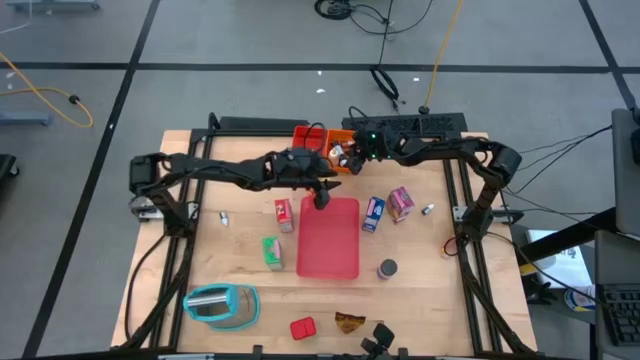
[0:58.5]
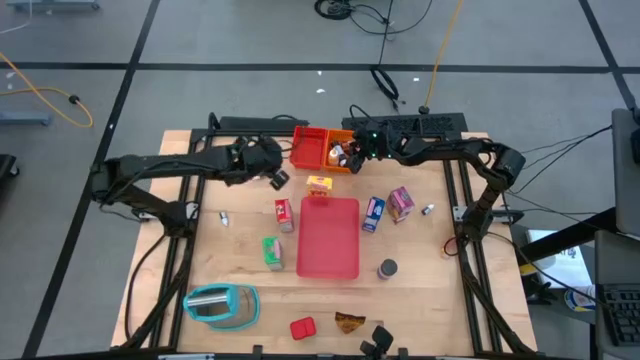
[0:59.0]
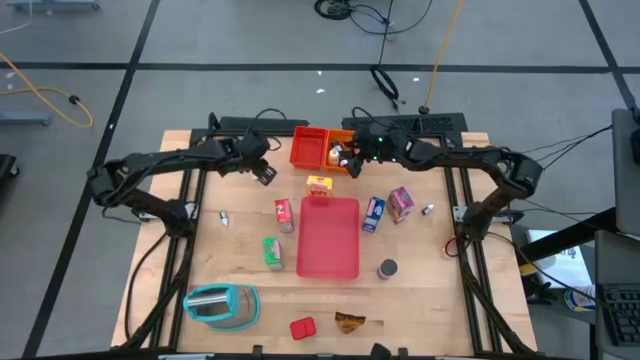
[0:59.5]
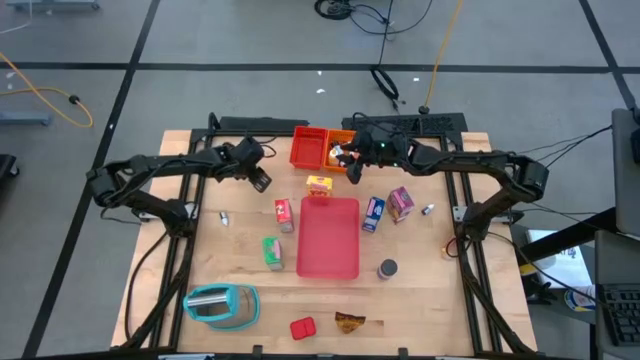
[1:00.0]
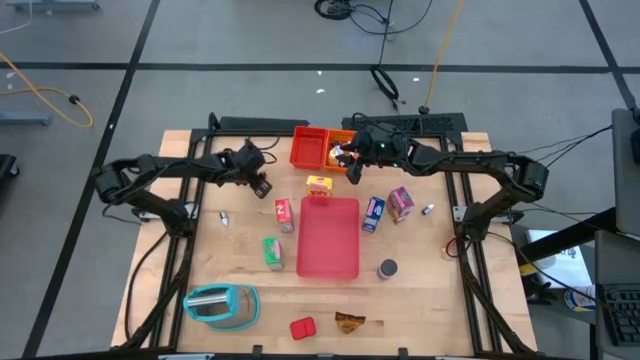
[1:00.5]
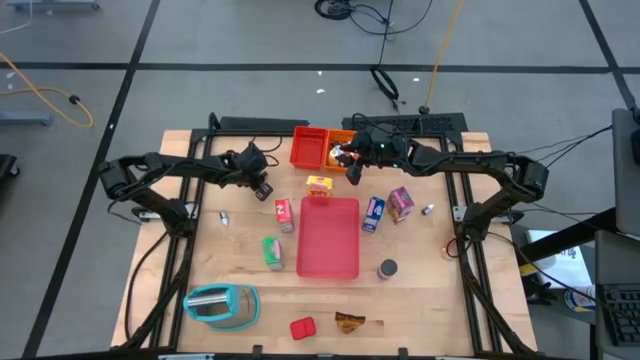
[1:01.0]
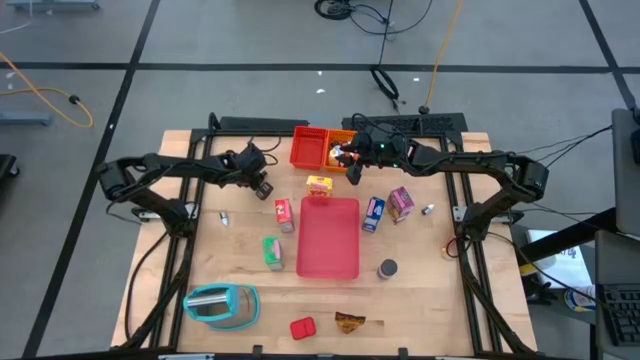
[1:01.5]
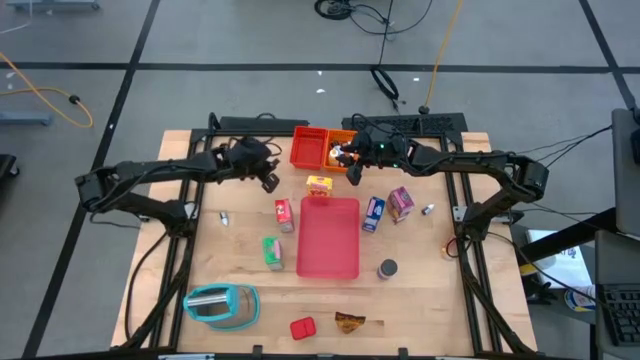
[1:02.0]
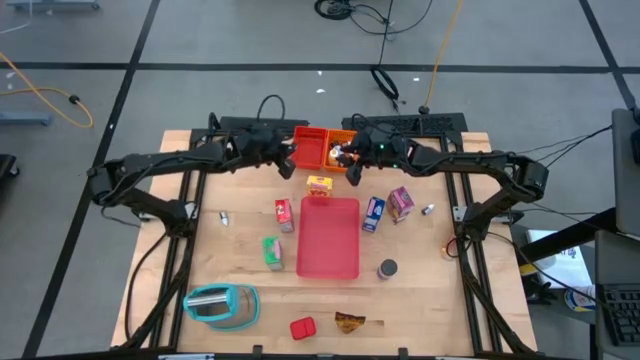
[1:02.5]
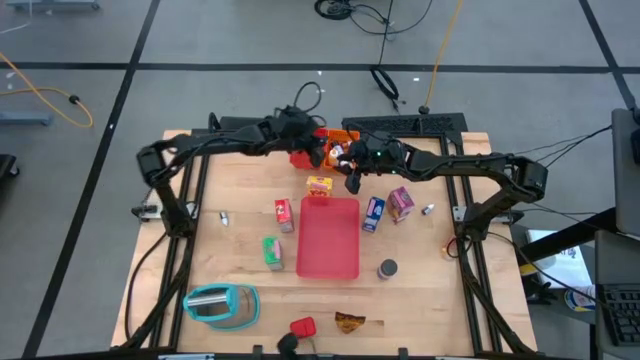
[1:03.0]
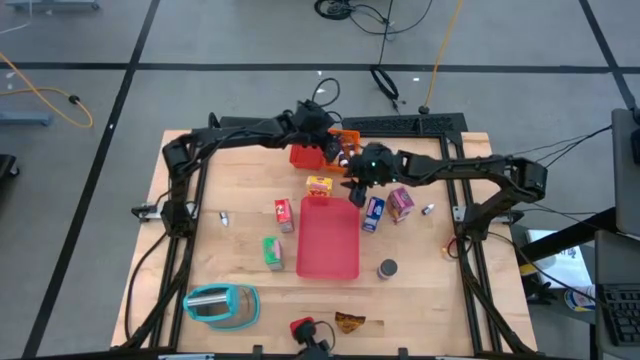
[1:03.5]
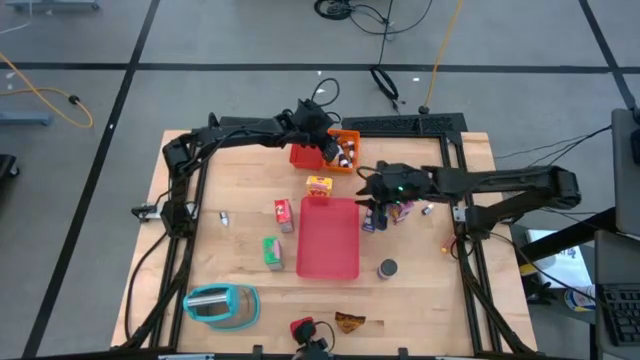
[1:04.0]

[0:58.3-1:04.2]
Task: Pick & Place Kitchen Items
Put the top small black food coloring bottle into the orange basket

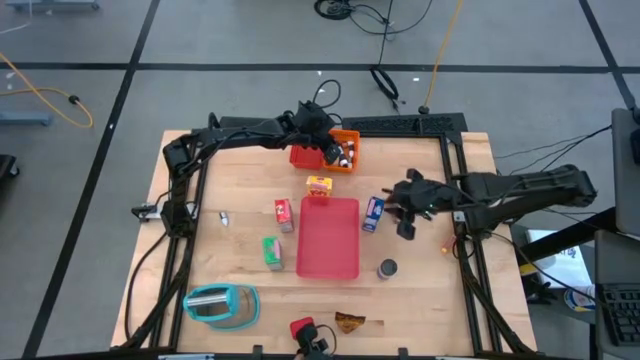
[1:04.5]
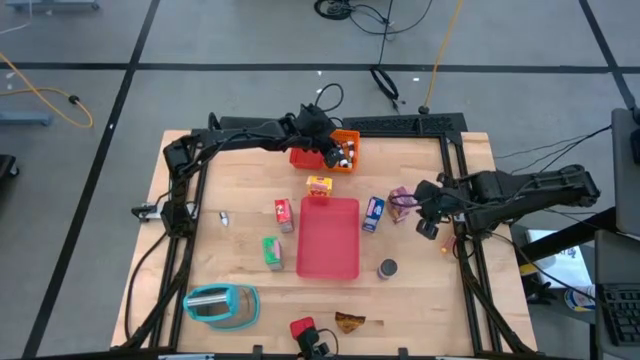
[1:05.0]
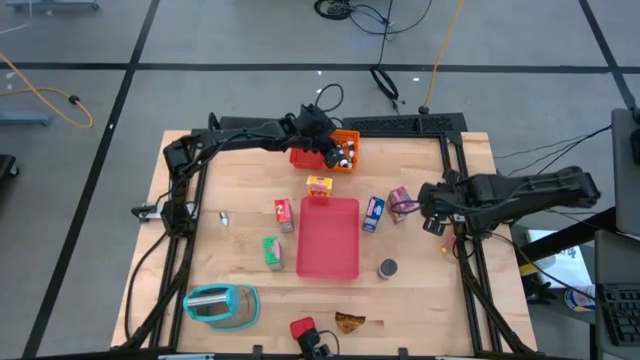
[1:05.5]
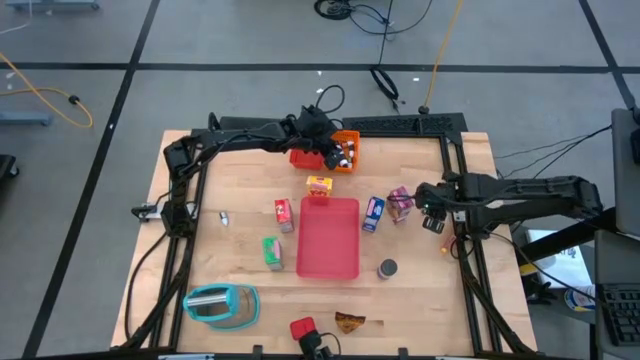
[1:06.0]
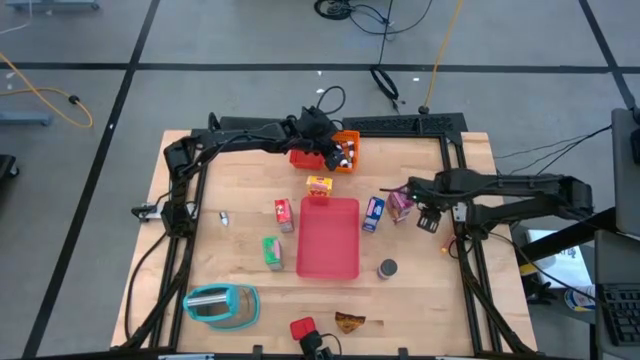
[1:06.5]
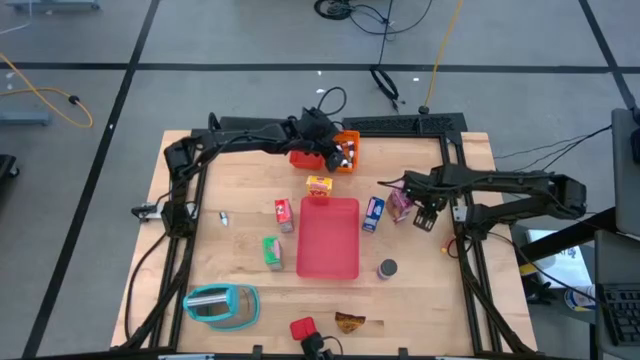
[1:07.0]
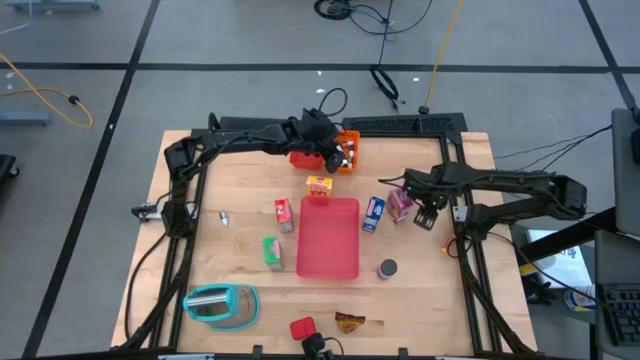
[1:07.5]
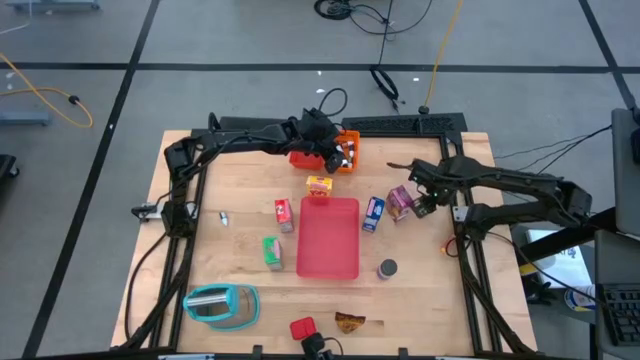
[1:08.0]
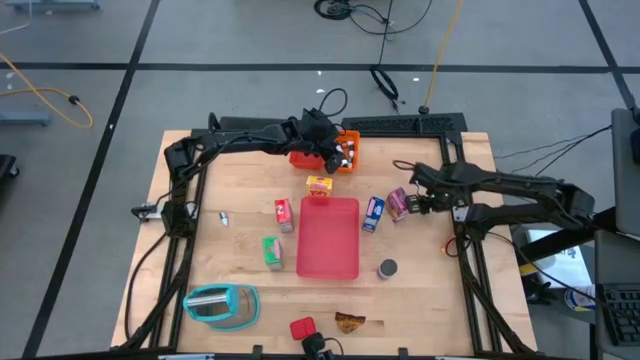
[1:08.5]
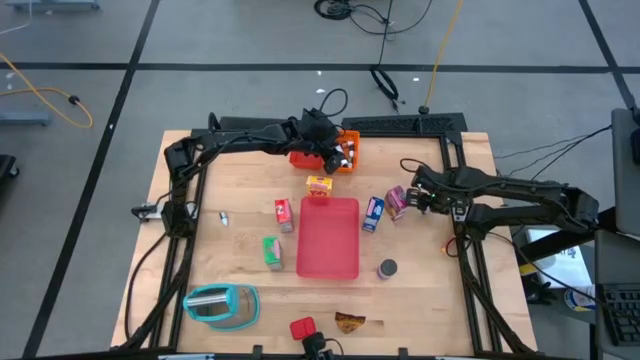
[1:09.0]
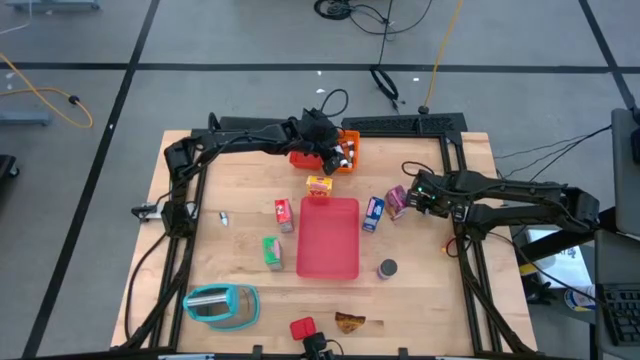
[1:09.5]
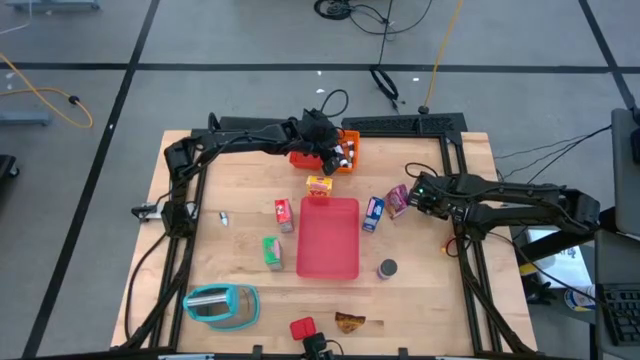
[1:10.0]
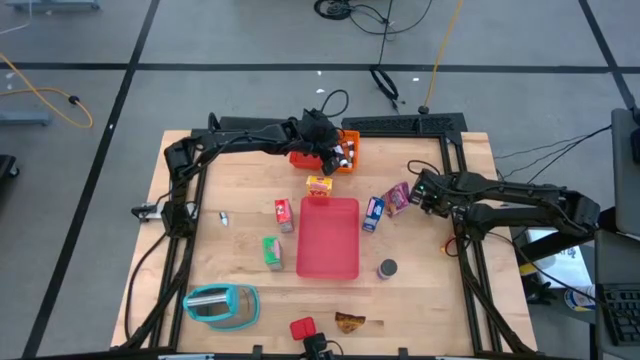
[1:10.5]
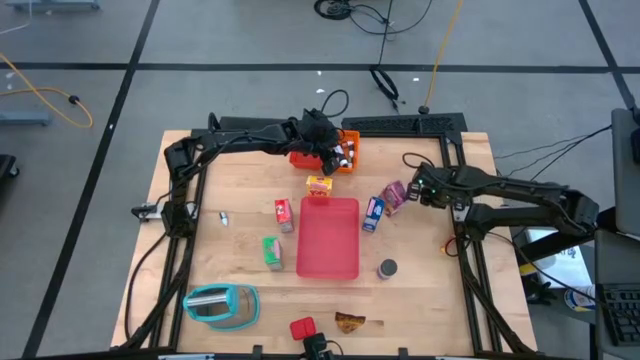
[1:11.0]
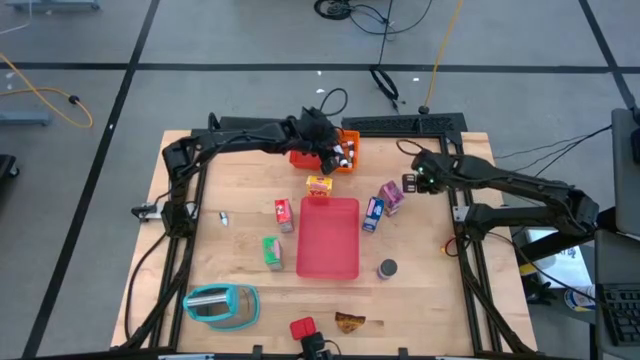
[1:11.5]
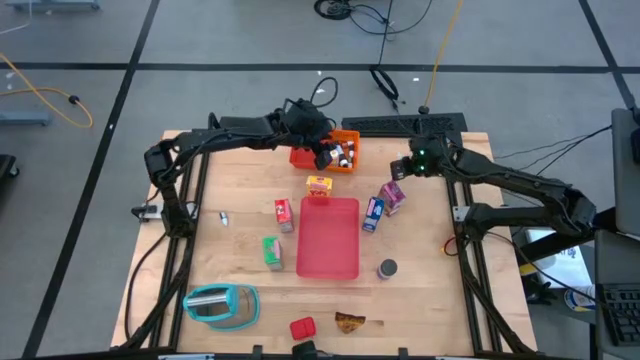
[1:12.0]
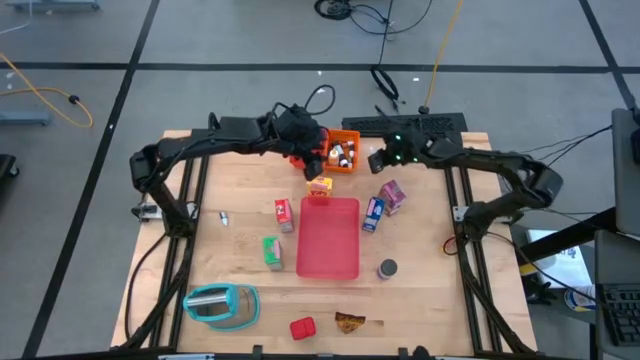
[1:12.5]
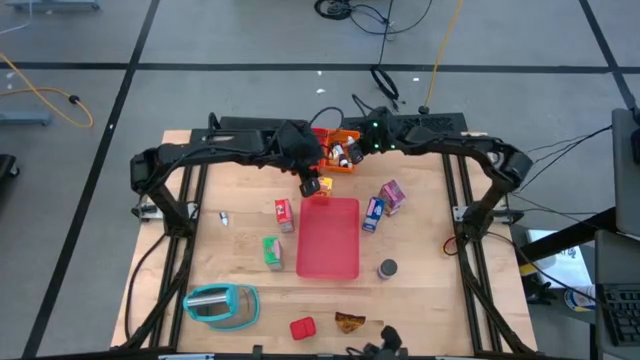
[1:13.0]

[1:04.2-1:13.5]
Put the purple food coloring bottle into the orange basket

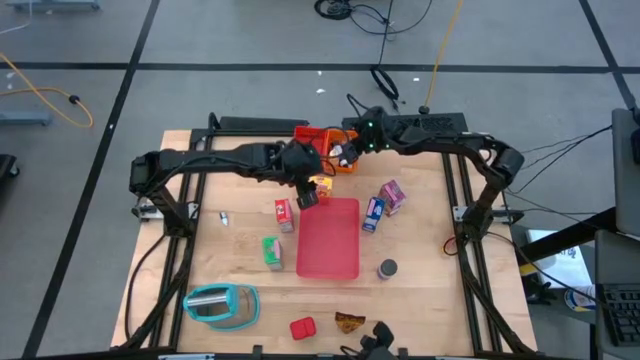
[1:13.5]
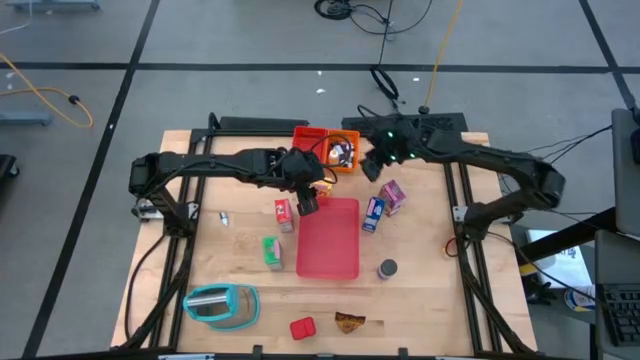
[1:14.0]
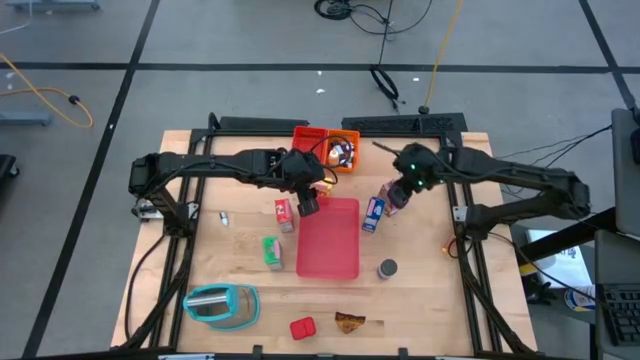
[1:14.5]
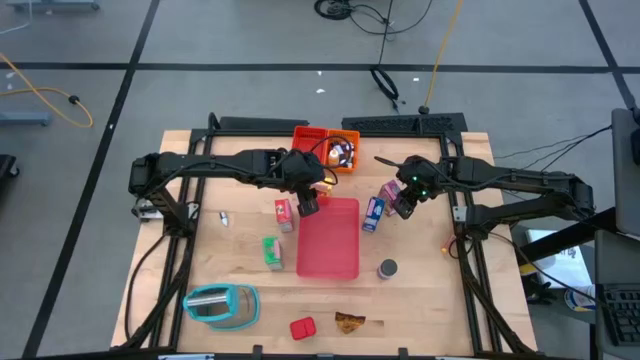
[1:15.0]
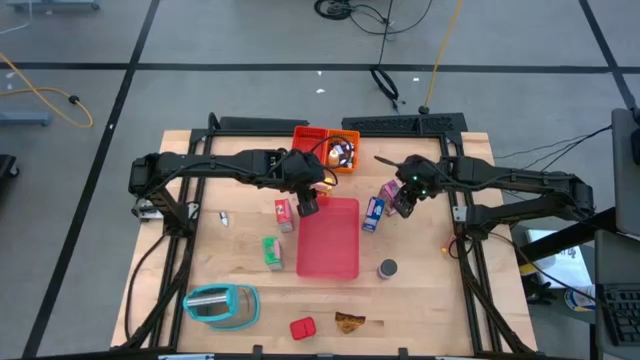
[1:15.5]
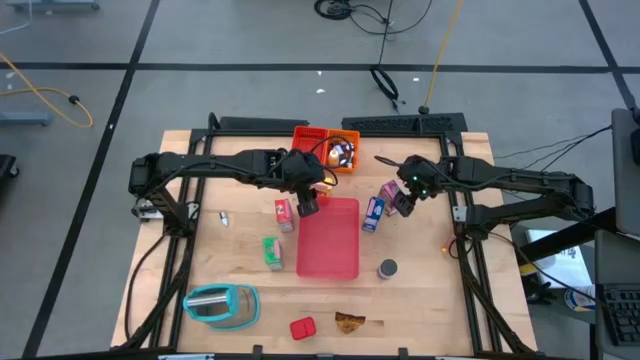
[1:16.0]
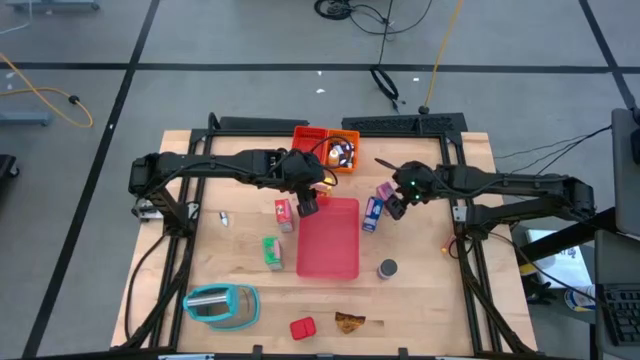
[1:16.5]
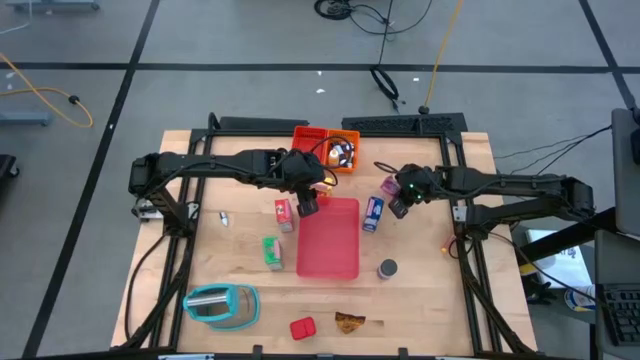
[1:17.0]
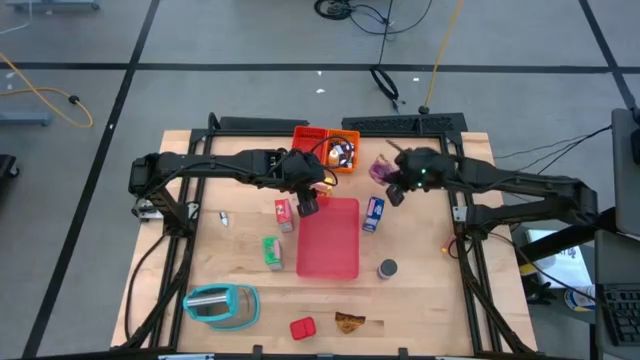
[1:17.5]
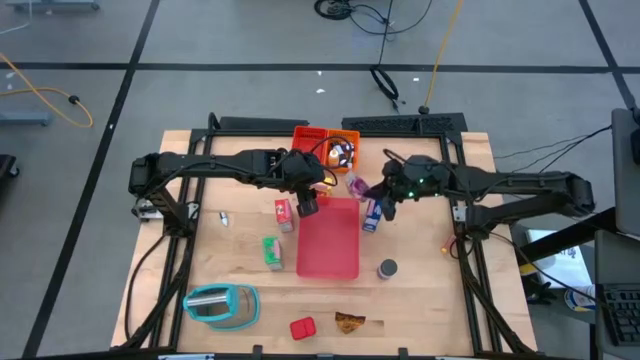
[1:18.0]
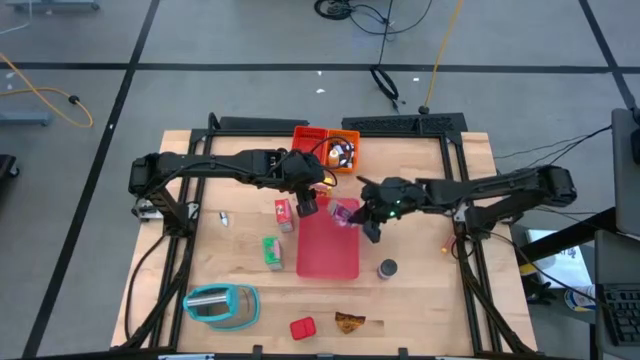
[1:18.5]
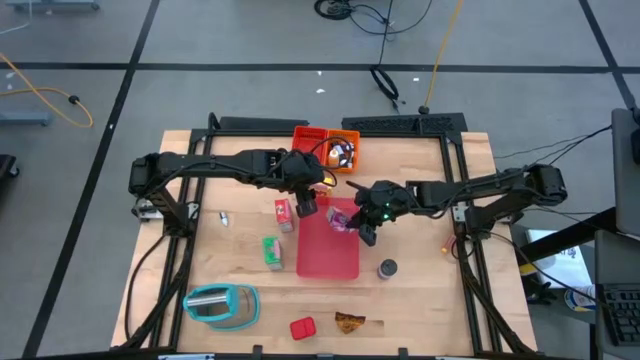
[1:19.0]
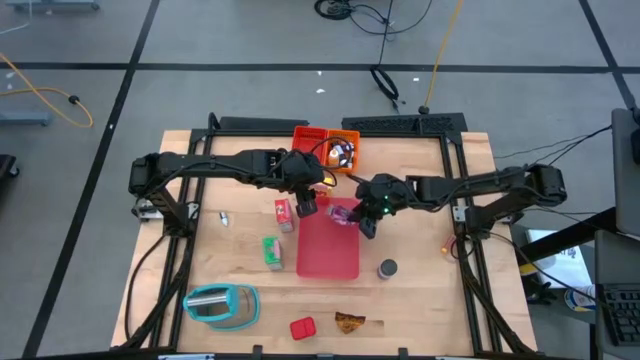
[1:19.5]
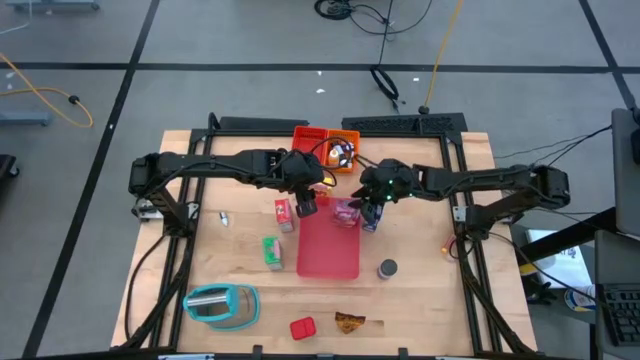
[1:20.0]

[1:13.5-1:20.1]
Put the purple cereal box into the light red bin
